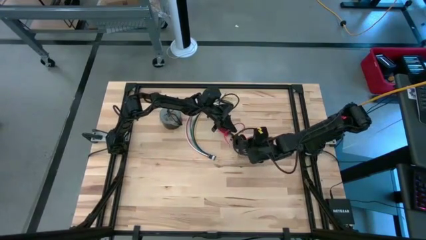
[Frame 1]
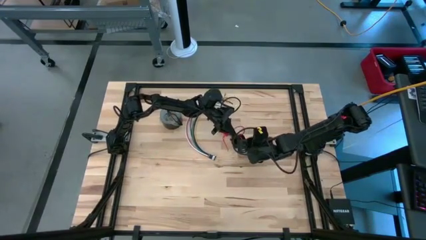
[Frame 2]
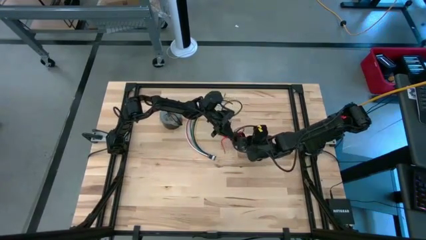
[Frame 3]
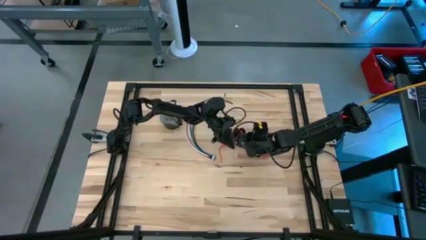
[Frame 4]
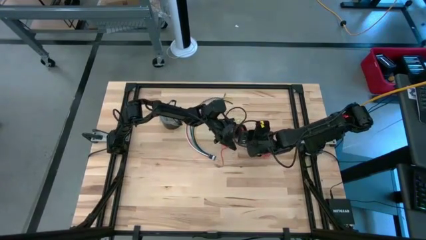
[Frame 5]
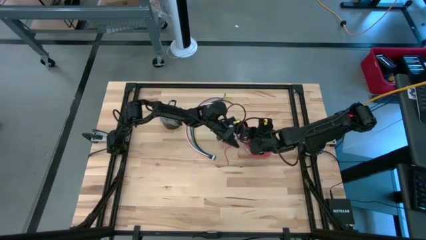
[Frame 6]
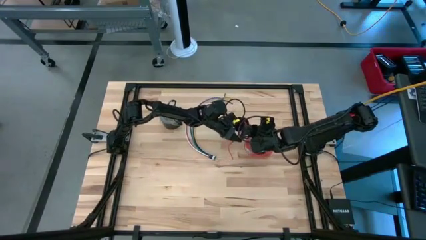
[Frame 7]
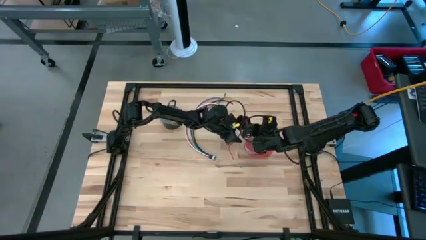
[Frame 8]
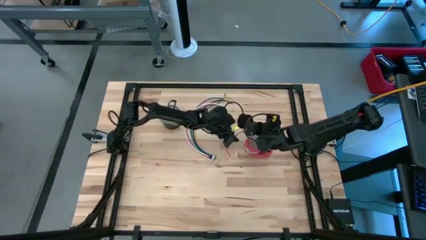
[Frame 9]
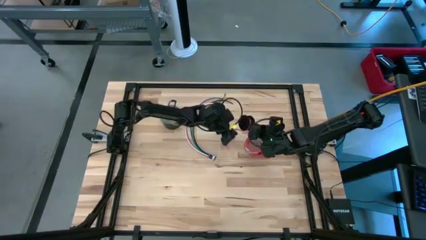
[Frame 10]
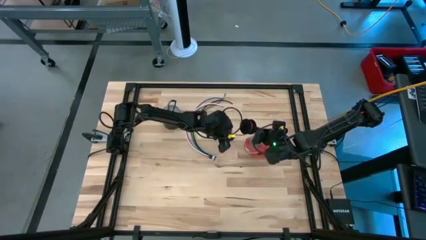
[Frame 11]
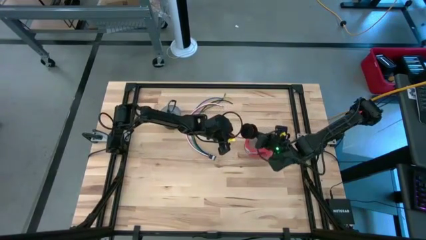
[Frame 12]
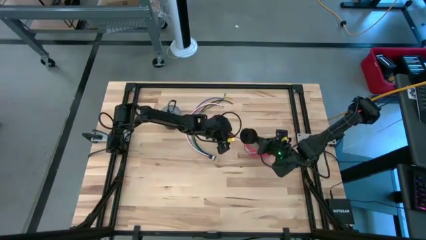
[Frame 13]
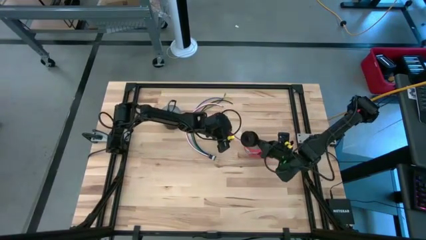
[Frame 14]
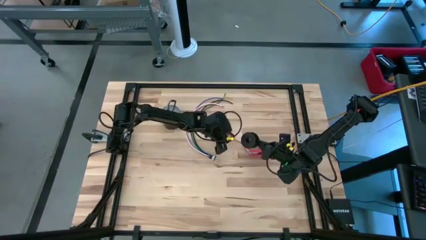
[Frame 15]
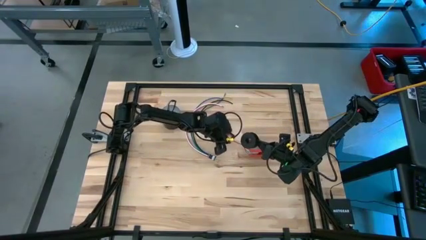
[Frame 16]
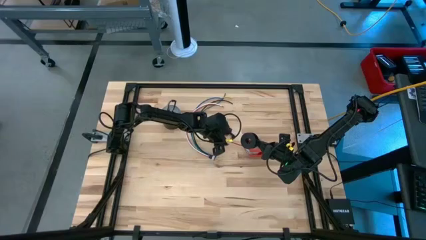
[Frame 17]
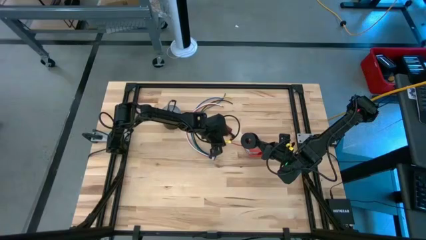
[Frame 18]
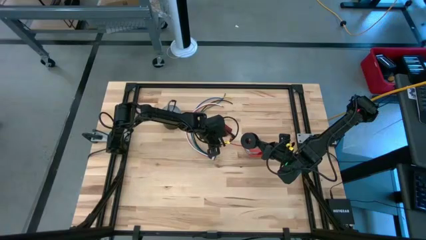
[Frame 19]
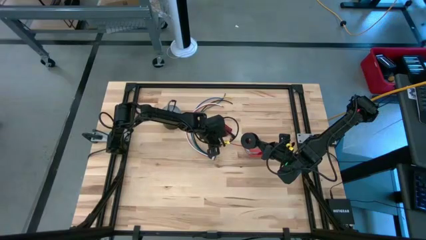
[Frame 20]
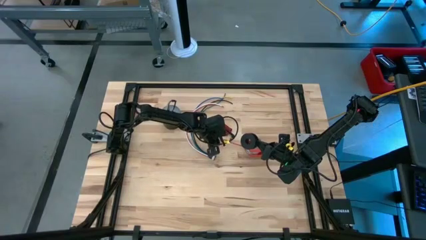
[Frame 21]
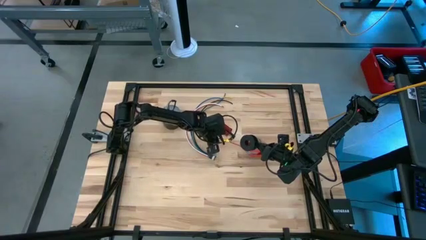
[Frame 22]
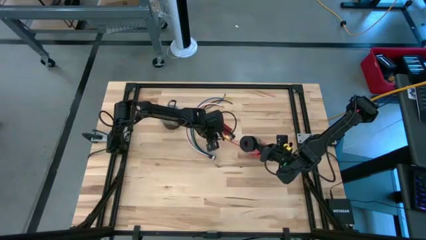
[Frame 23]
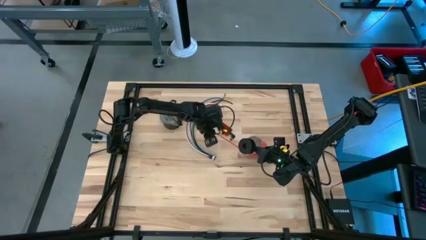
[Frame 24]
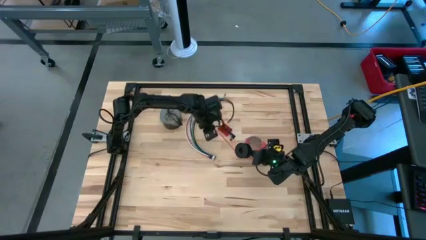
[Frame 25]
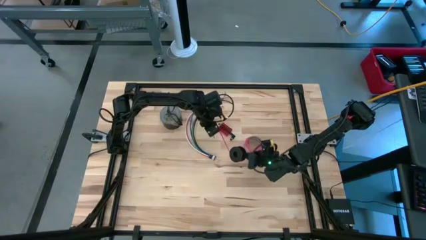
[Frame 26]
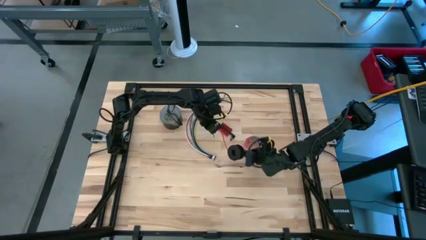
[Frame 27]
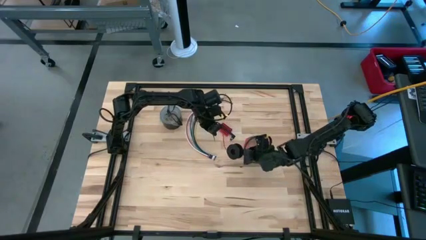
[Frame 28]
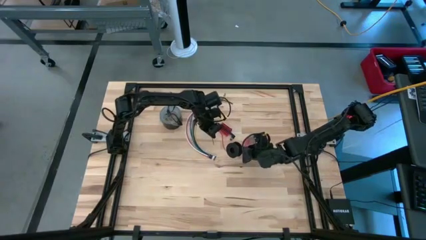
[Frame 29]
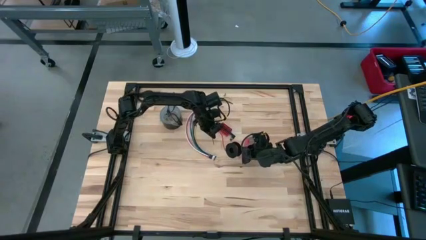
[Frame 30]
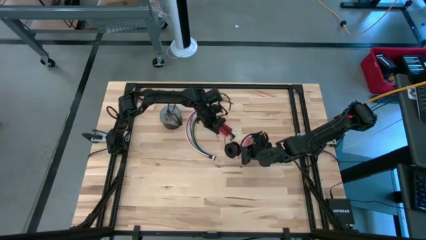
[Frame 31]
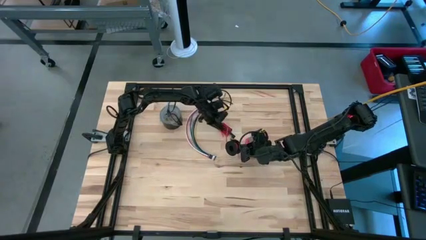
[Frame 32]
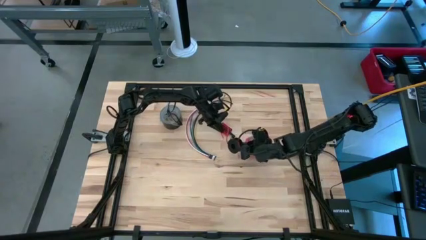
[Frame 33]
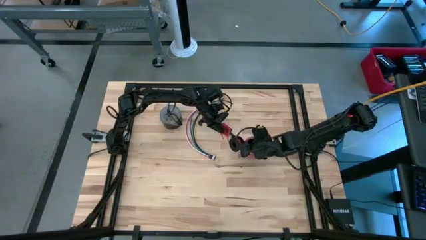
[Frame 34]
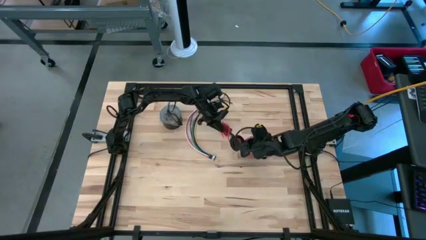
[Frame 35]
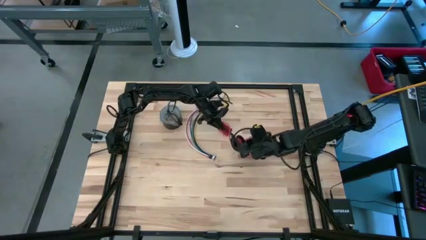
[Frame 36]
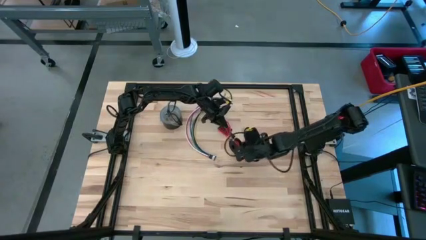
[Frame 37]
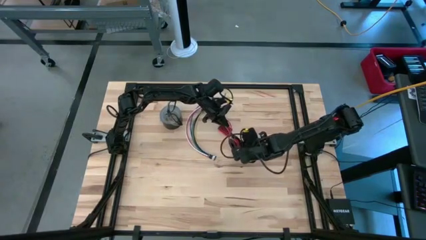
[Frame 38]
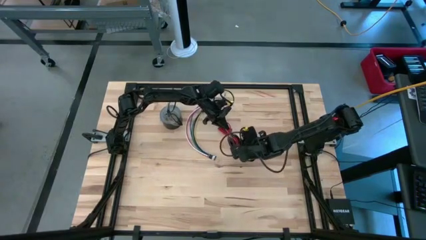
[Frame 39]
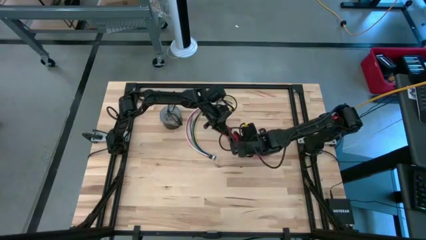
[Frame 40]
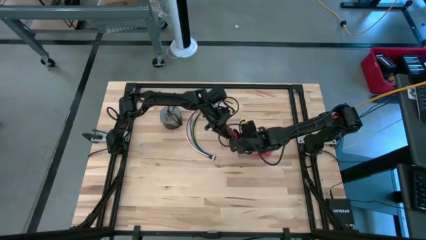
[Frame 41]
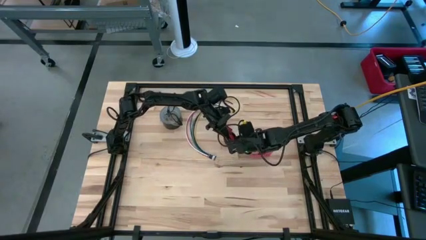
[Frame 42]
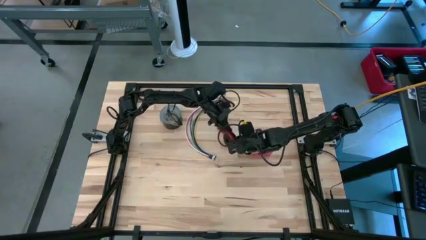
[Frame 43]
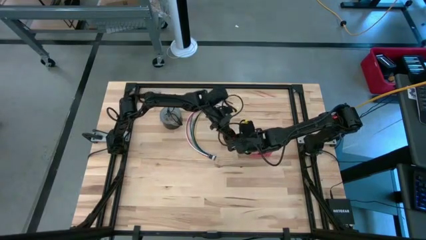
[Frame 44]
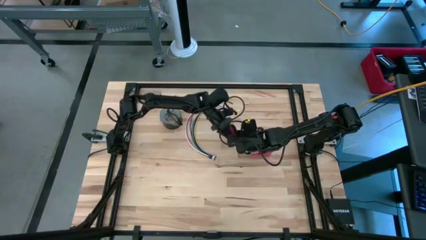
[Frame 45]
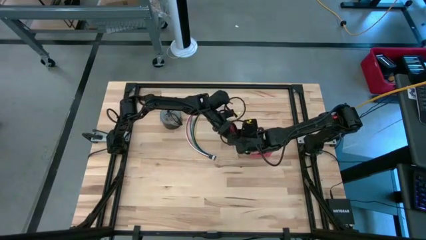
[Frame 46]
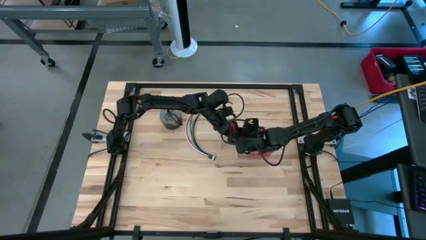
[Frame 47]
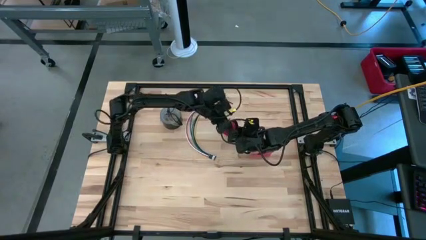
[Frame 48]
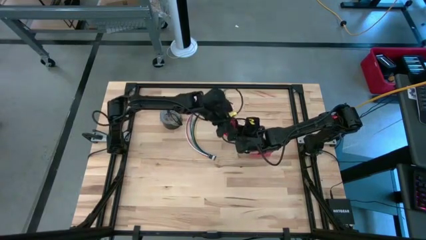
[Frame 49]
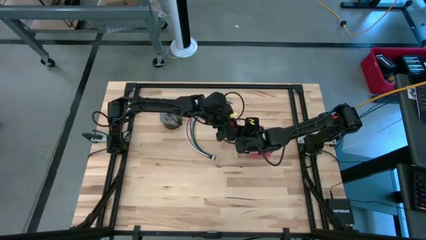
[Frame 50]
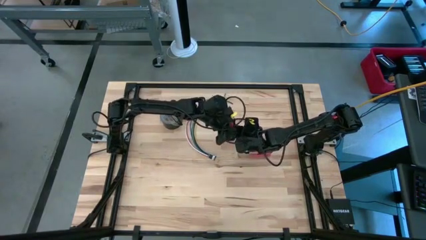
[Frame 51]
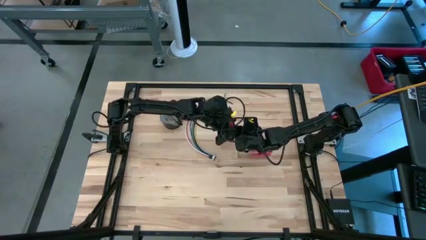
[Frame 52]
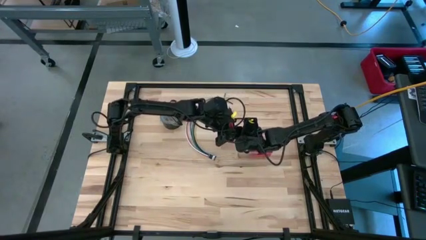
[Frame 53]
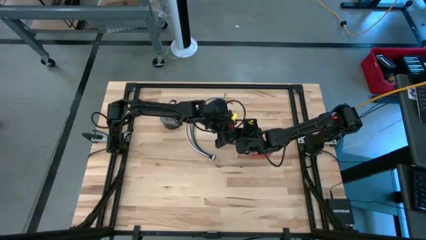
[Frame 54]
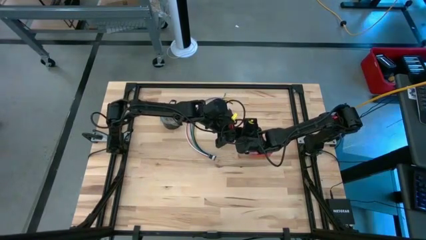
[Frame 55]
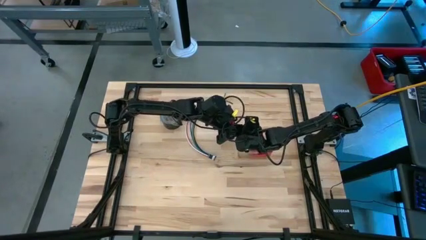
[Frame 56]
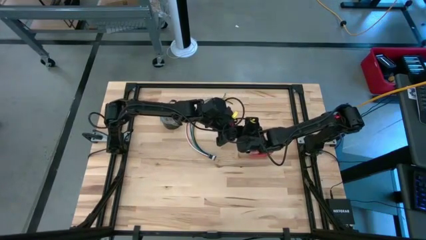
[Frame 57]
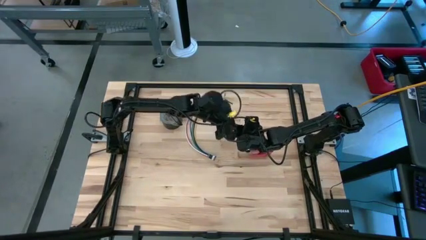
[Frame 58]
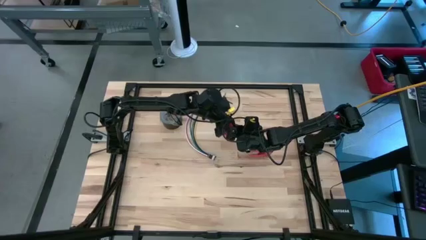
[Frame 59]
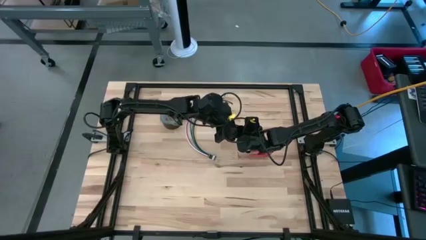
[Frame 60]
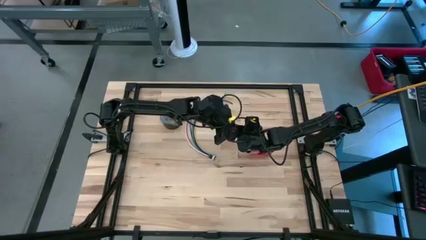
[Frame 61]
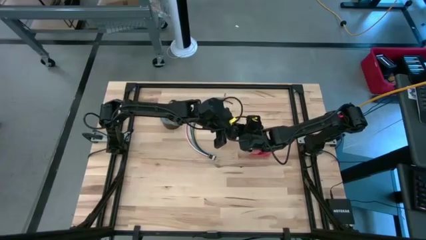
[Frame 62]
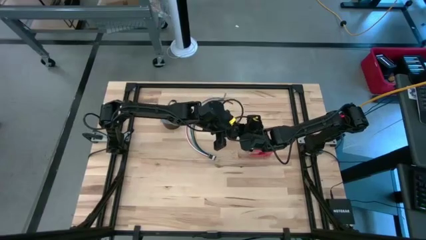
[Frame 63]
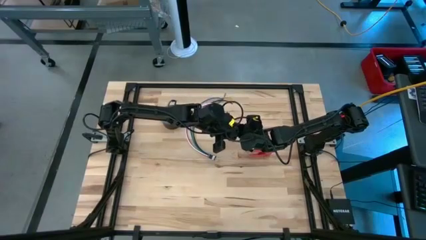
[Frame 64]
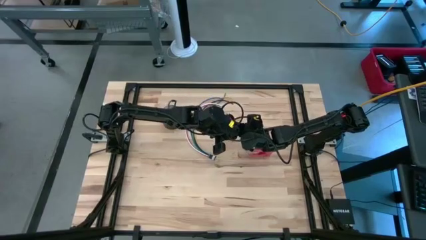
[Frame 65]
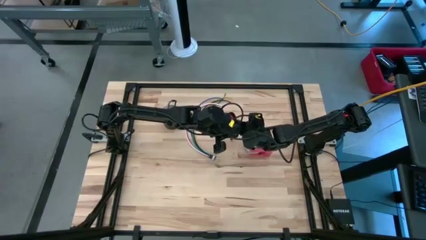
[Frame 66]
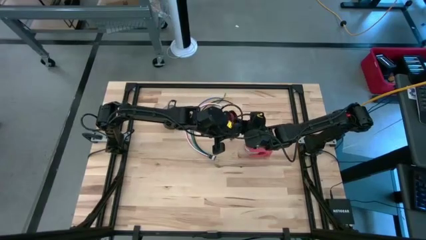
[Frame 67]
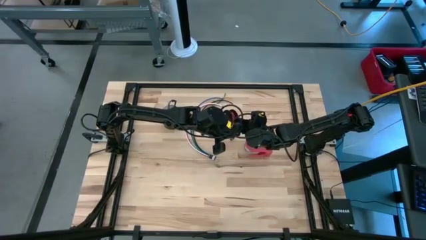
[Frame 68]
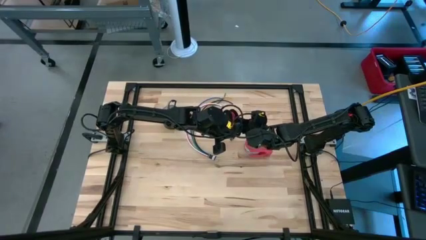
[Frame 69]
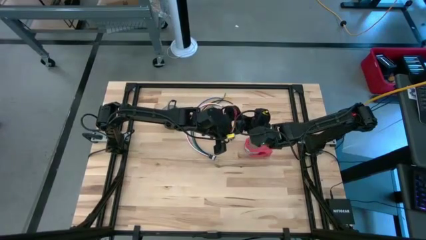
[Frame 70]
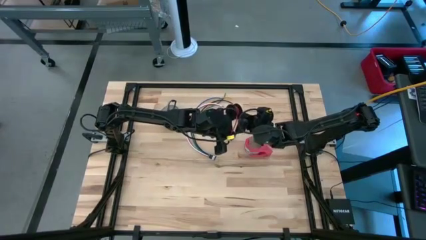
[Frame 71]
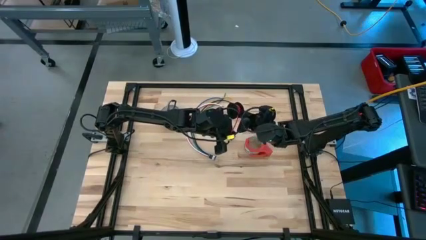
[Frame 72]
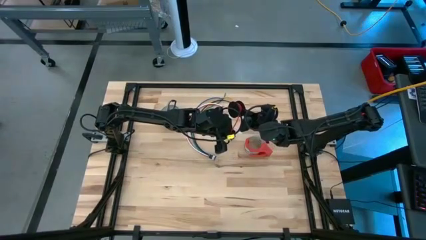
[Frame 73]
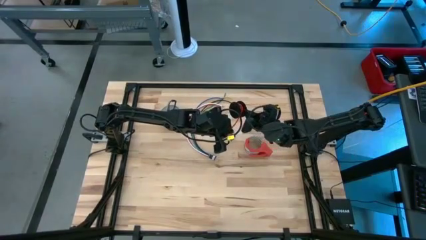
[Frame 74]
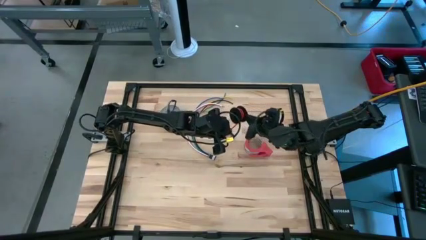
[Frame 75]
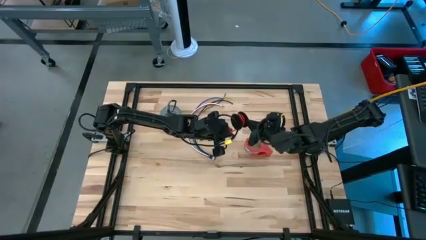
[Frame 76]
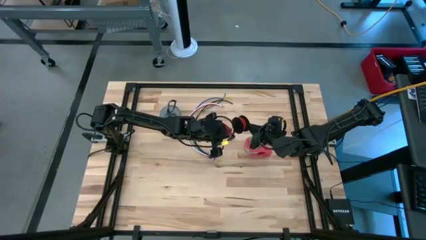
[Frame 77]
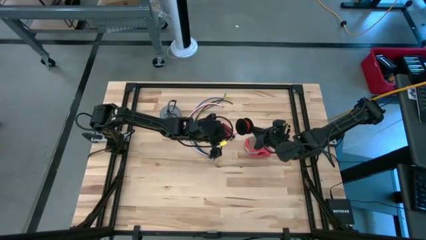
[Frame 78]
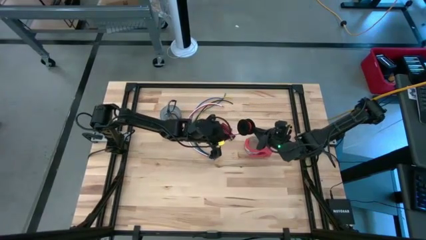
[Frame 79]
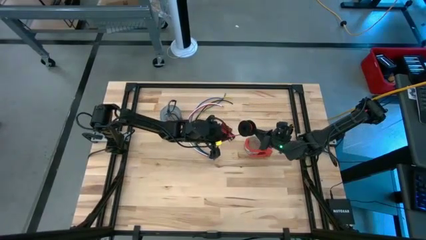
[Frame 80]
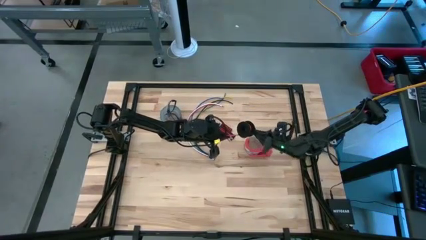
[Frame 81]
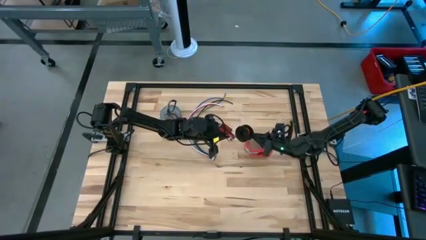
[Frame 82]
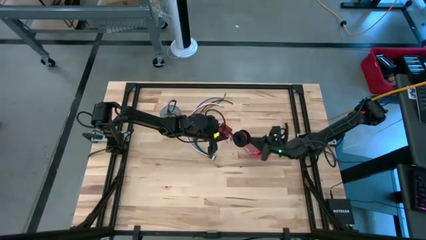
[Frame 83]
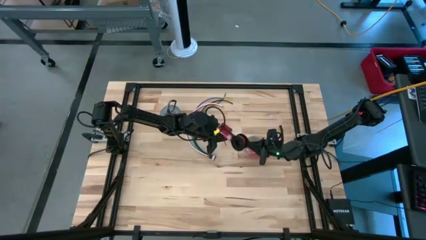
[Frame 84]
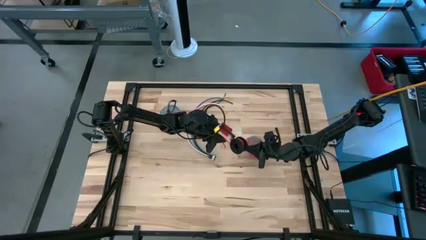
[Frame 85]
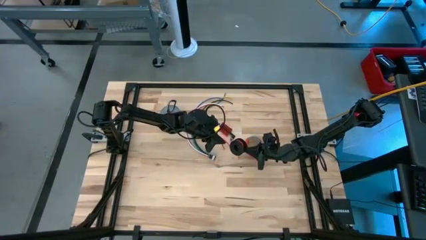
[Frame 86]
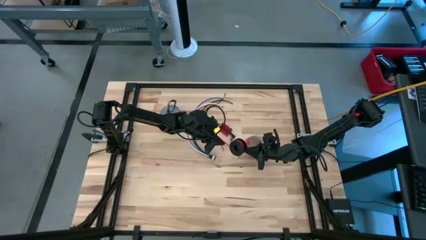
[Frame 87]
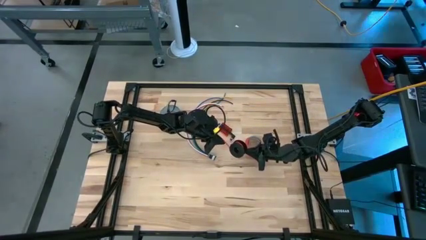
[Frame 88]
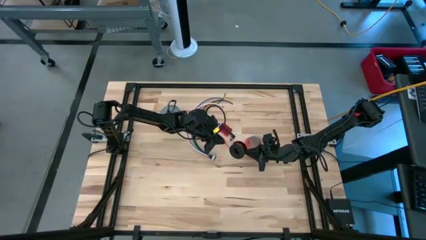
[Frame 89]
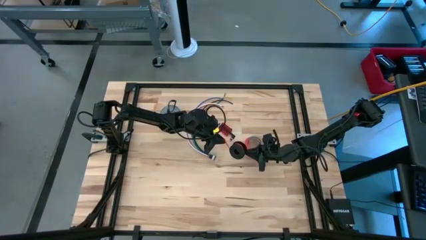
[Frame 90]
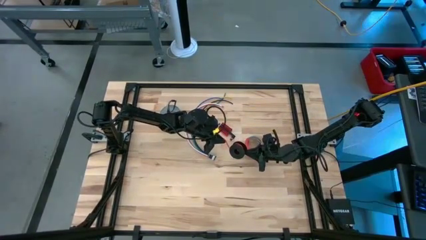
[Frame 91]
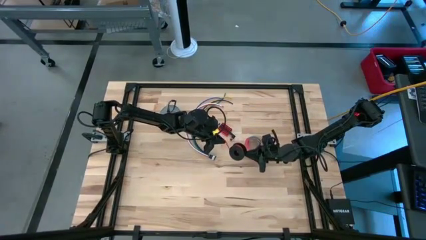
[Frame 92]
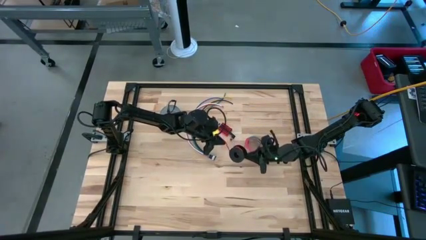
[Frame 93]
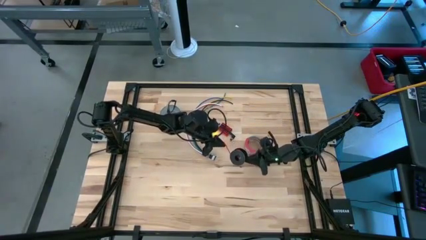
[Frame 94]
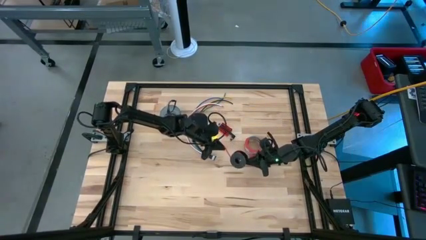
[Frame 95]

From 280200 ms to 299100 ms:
Task: Coil cords
Coil the red wire onto the spool
